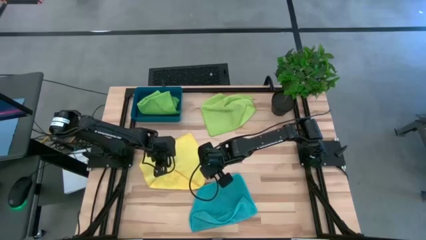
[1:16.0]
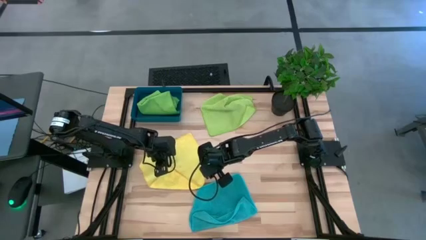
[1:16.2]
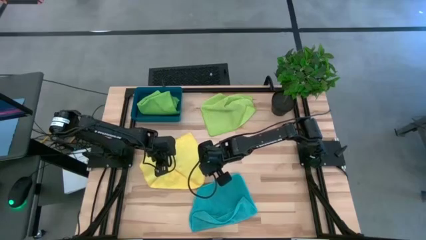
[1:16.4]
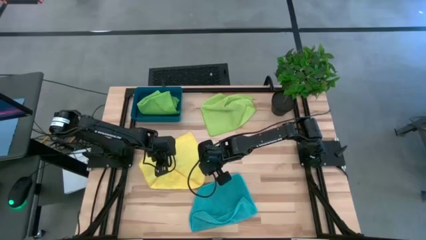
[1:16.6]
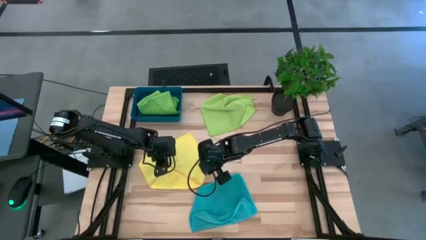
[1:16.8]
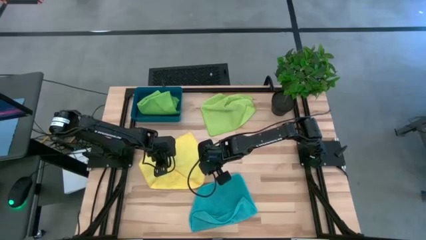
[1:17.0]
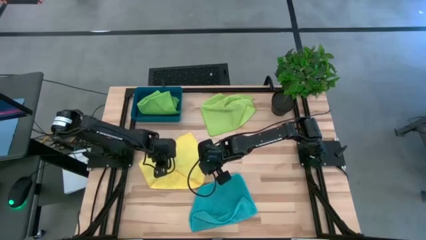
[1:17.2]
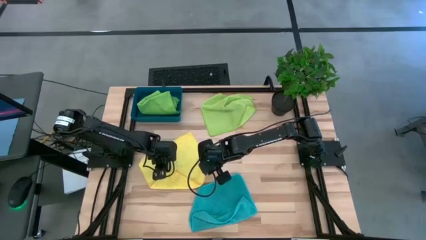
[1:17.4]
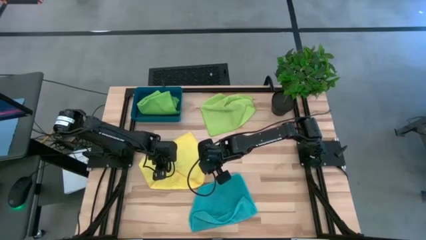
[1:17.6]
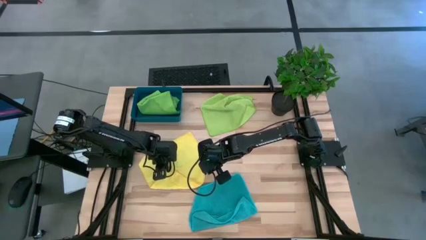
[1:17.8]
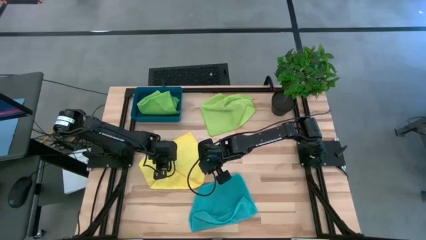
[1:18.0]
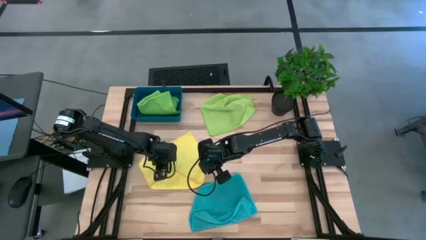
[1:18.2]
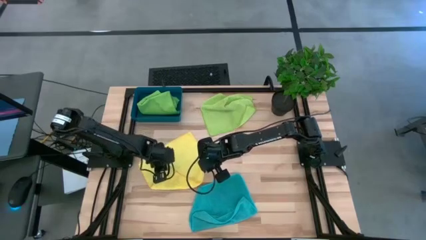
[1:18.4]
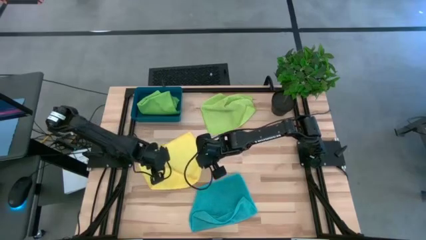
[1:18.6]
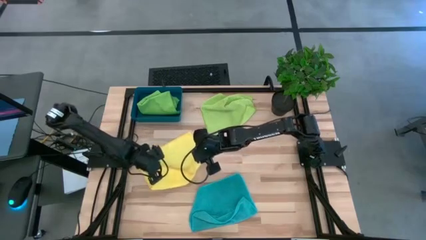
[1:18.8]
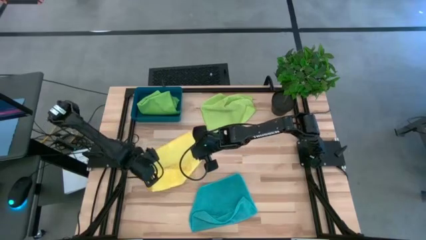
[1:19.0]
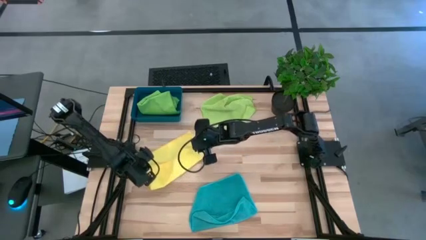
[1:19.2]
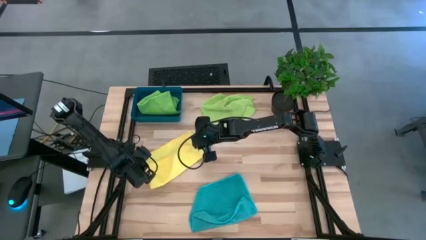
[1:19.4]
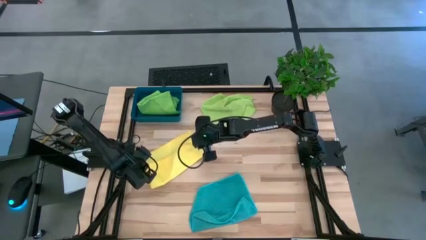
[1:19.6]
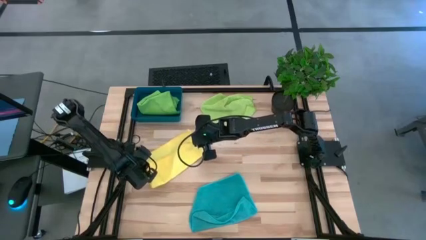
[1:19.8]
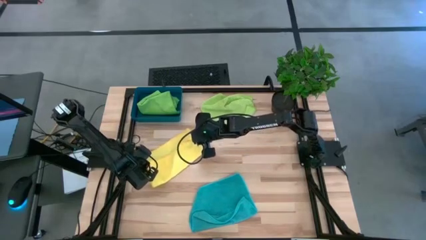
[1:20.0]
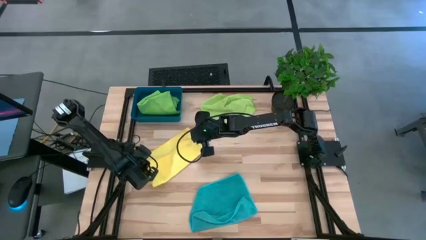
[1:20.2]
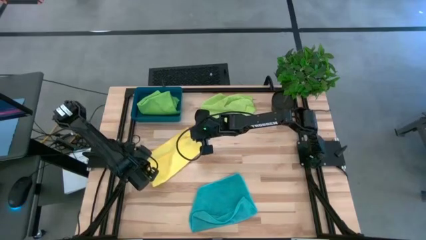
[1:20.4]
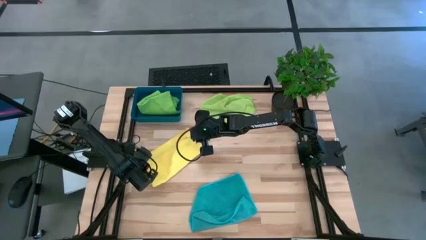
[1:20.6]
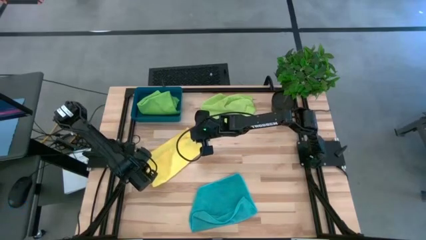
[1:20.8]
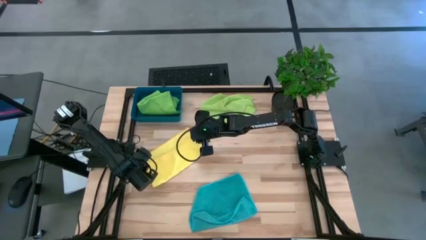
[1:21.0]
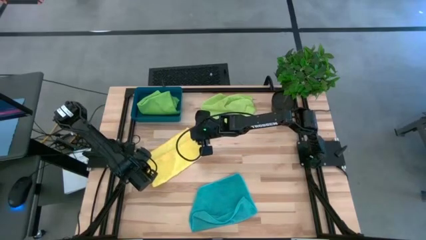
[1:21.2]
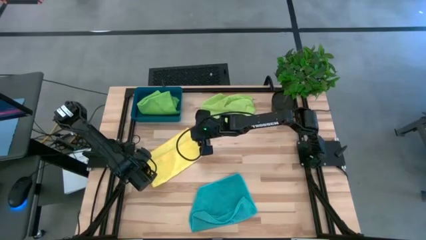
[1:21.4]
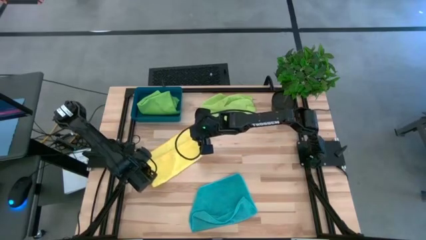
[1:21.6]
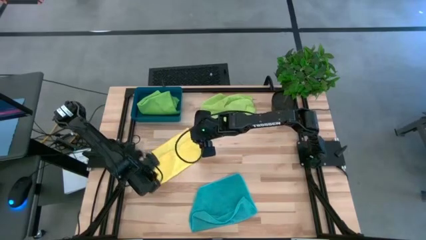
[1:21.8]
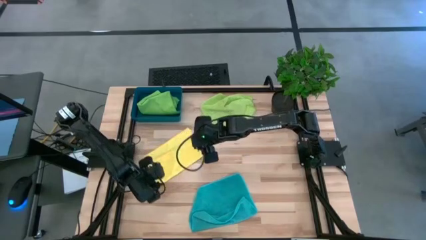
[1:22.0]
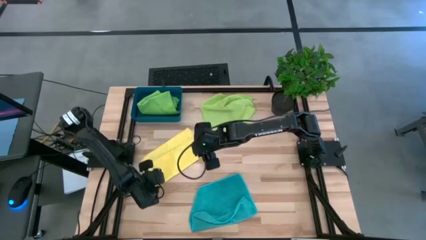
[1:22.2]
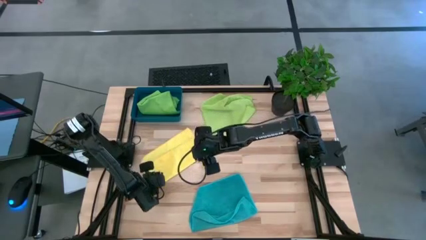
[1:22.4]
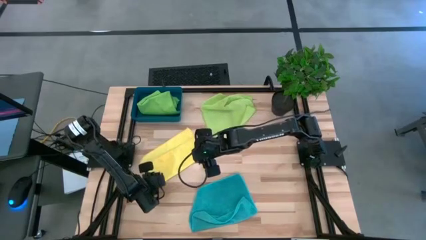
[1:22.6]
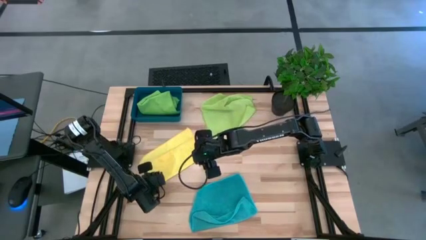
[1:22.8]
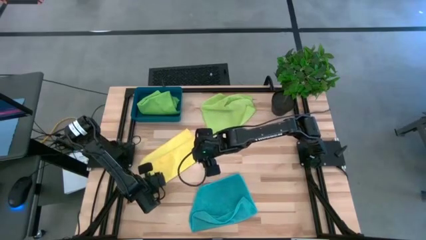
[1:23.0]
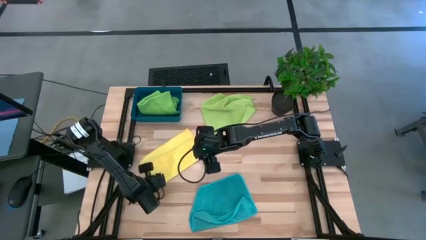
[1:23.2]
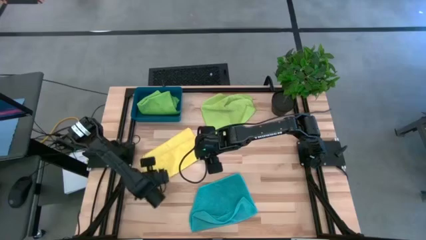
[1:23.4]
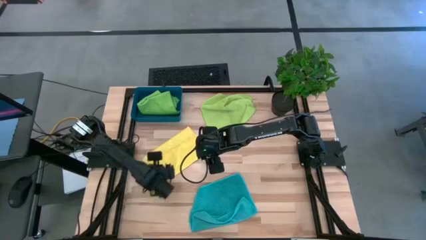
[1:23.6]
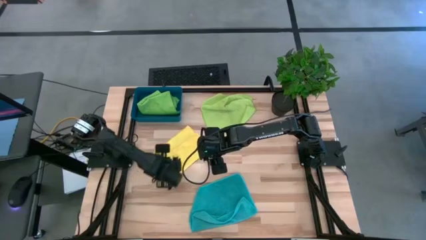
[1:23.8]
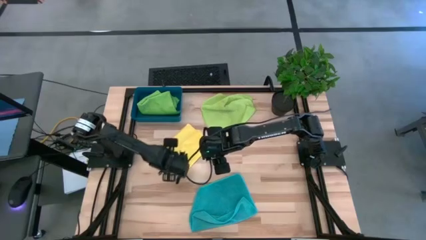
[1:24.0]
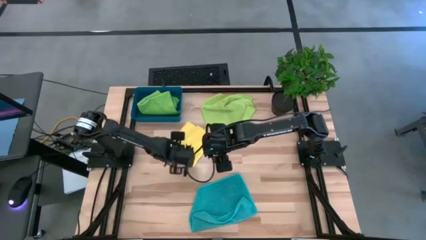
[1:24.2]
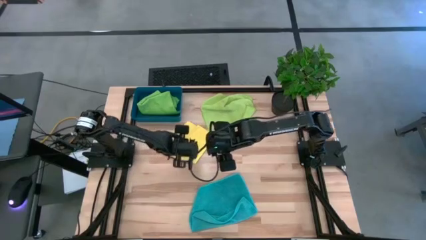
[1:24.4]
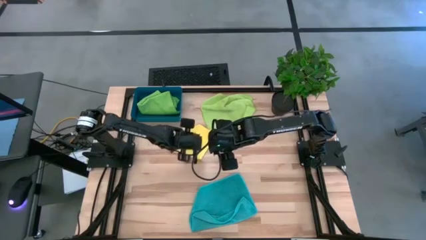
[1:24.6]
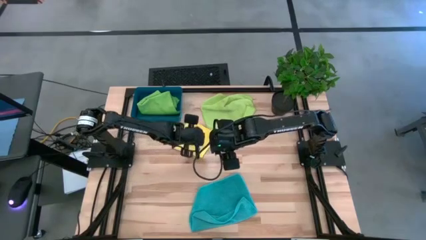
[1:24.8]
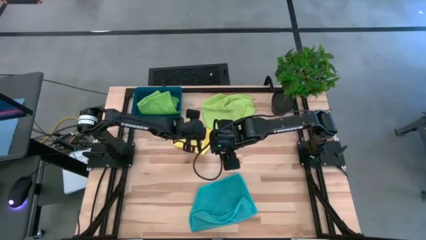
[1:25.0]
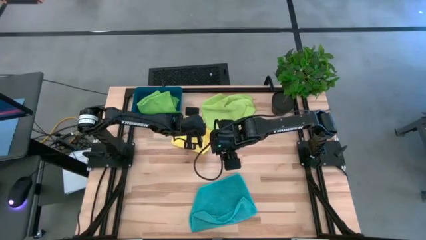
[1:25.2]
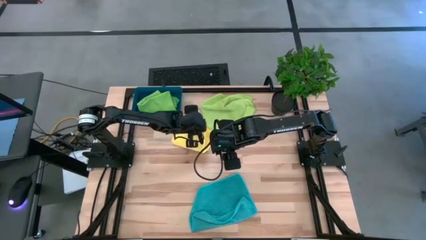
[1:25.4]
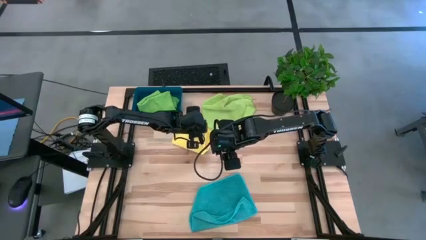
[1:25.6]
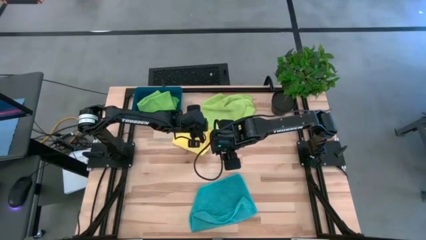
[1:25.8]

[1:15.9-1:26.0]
Task: Fold microfiber towels
Fold the yellow towel

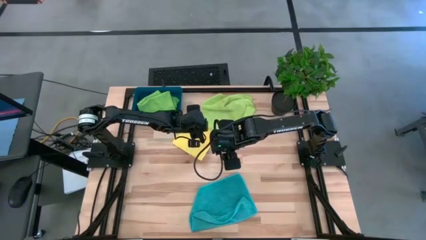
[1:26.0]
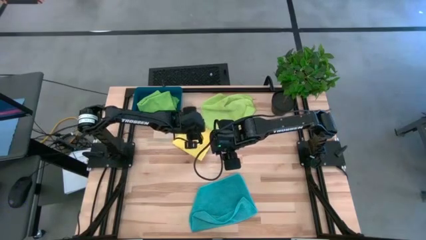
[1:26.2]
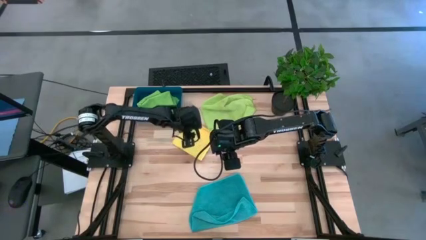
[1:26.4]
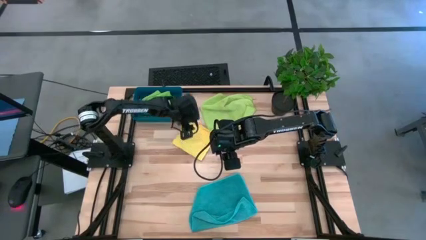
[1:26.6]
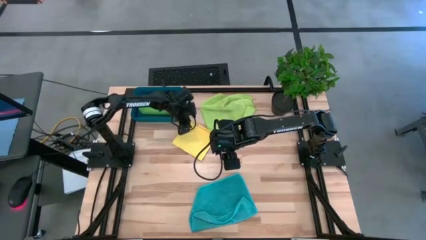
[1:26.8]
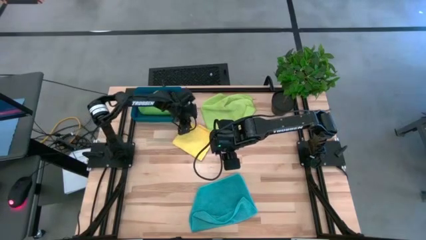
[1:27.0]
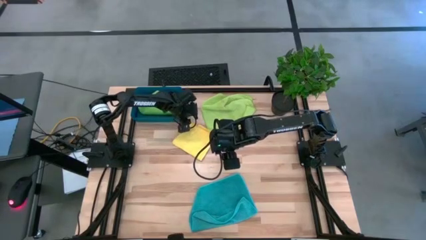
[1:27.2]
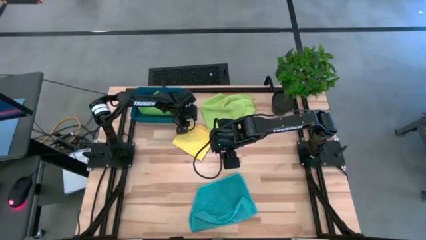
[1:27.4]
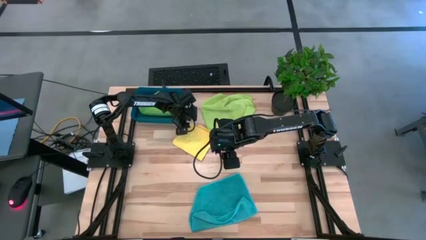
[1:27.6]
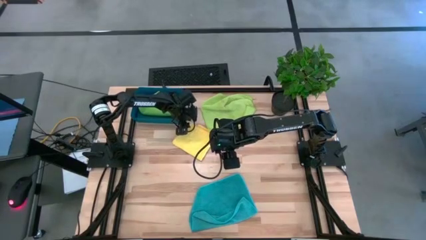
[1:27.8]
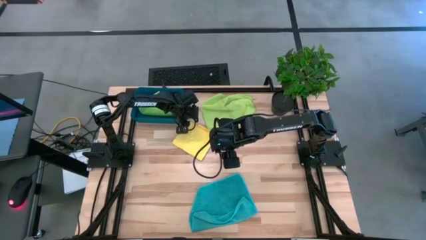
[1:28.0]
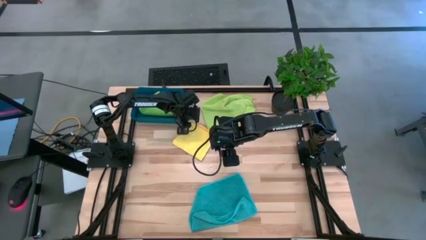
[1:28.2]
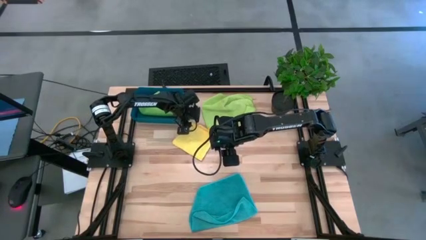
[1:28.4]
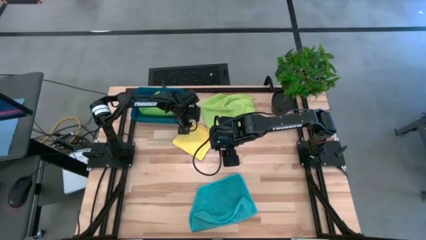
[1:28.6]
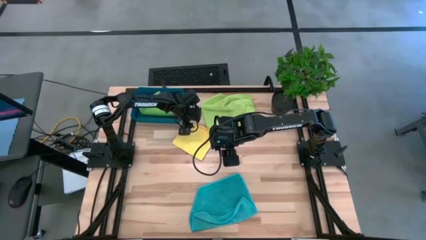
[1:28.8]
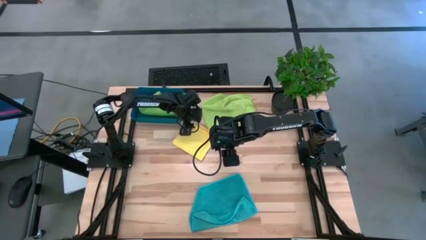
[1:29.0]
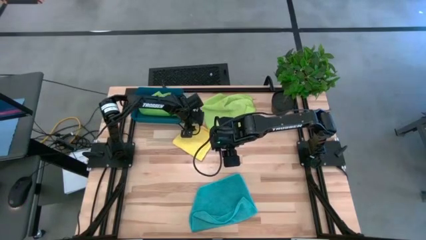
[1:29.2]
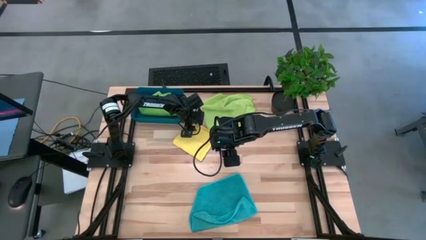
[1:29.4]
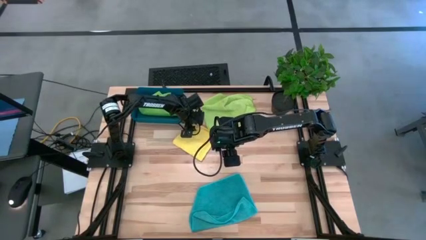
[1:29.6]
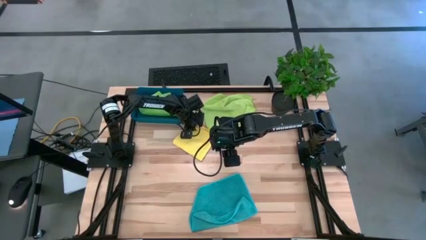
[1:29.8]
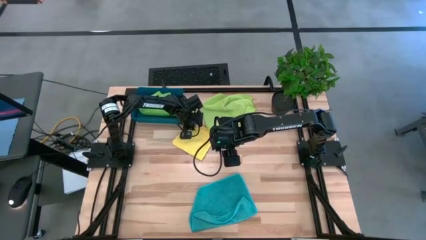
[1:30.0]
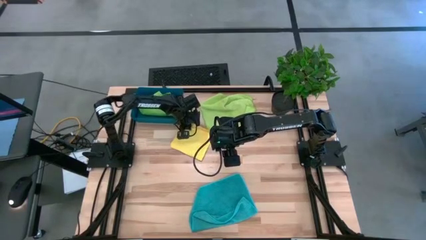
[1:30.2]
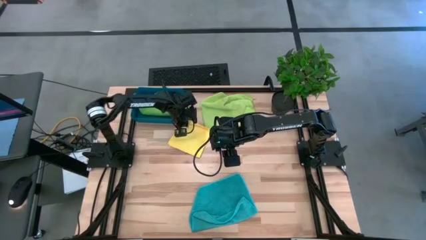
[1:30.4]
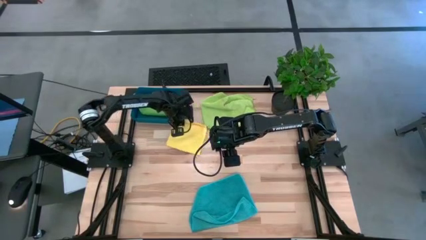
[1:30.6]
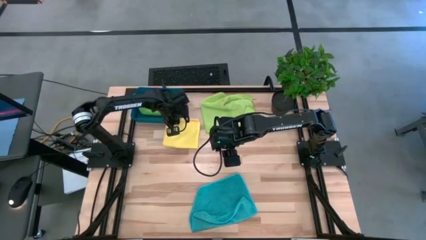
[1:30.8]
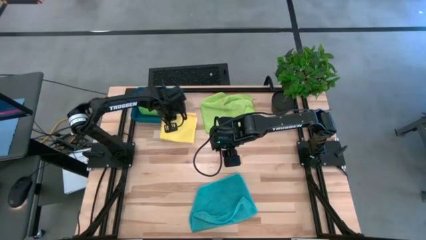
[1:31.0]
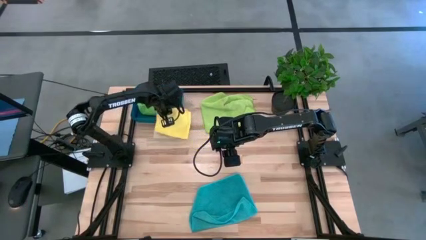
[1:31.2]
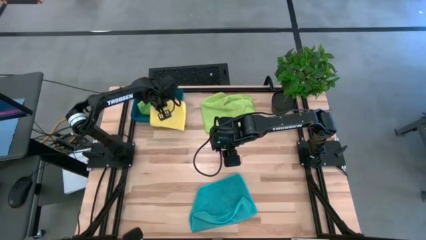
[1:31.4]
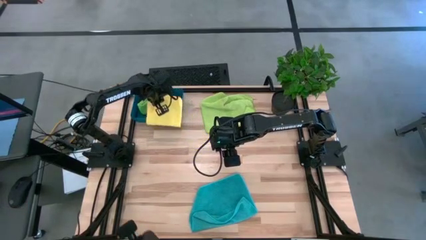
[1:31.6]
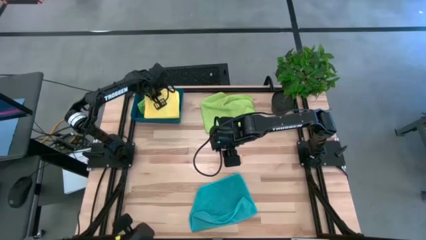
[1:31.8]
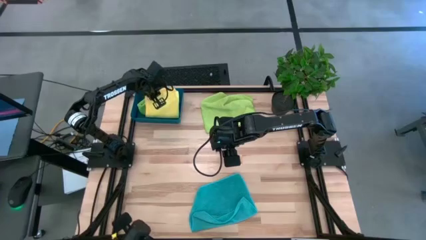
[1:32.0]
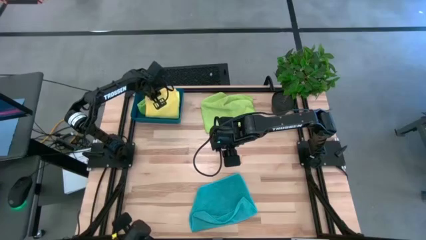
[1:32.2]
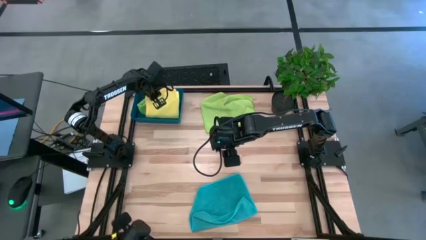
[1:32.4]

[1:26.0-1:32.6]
Put the yellow towel into the blue bin
